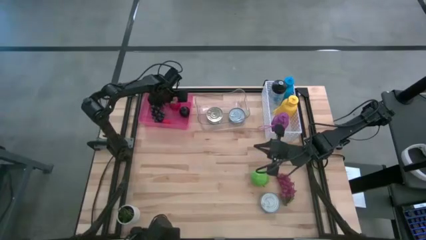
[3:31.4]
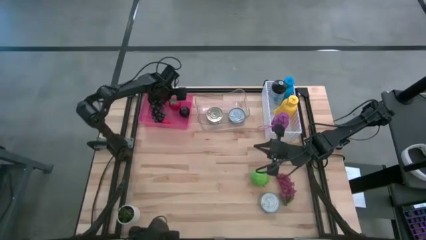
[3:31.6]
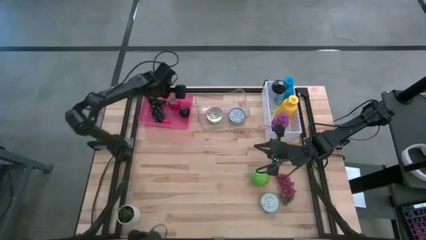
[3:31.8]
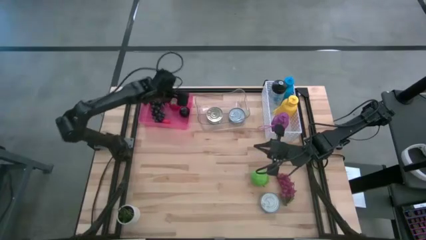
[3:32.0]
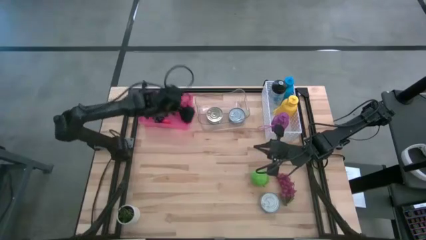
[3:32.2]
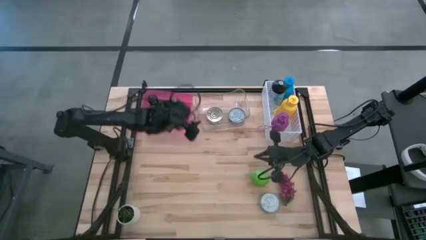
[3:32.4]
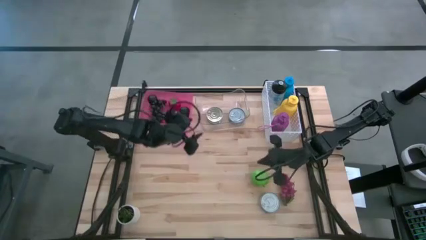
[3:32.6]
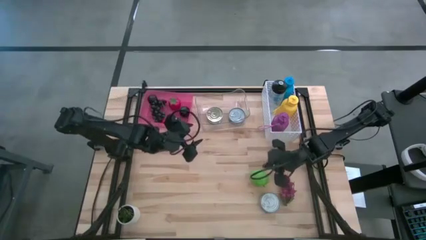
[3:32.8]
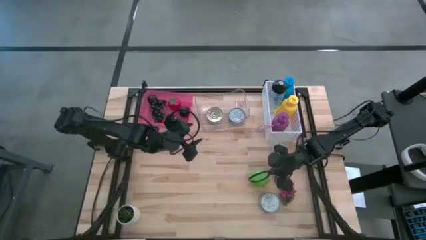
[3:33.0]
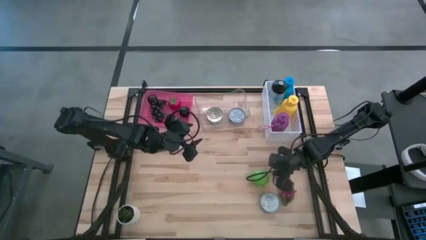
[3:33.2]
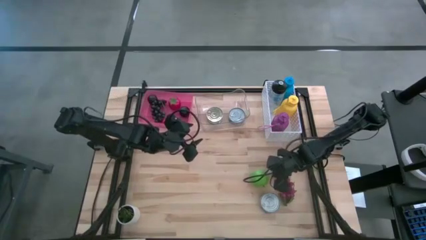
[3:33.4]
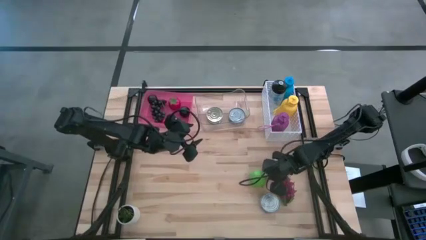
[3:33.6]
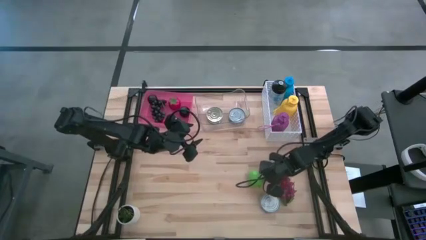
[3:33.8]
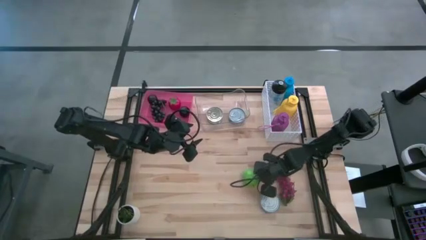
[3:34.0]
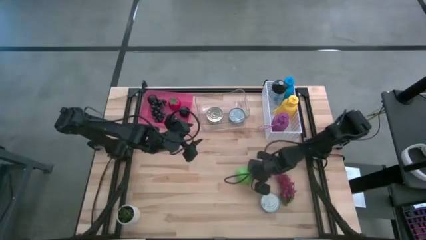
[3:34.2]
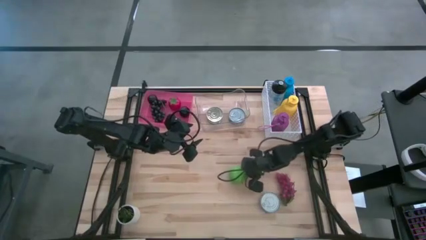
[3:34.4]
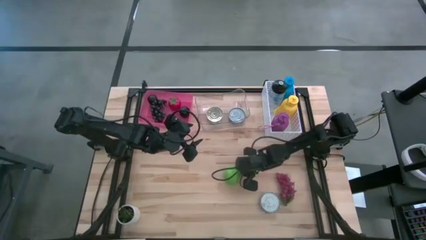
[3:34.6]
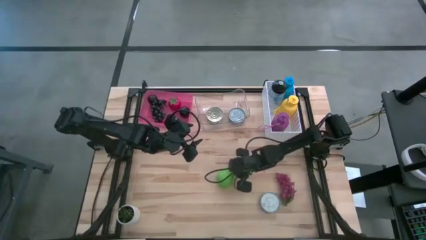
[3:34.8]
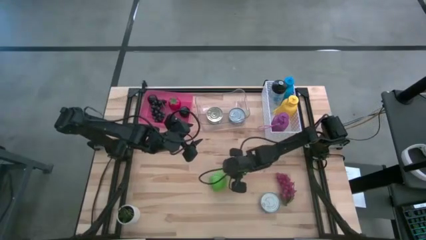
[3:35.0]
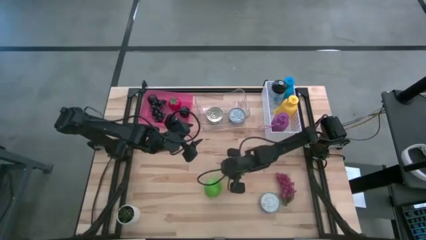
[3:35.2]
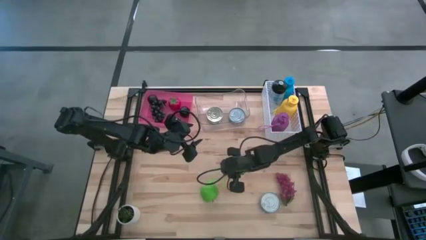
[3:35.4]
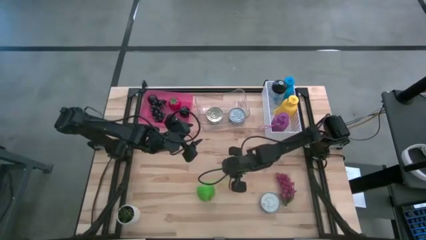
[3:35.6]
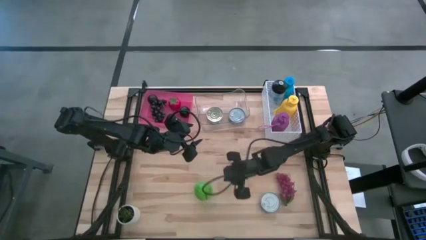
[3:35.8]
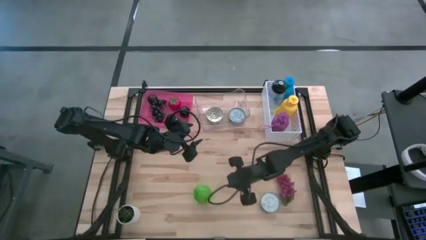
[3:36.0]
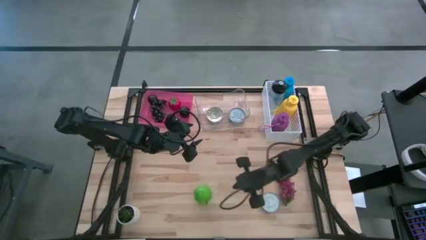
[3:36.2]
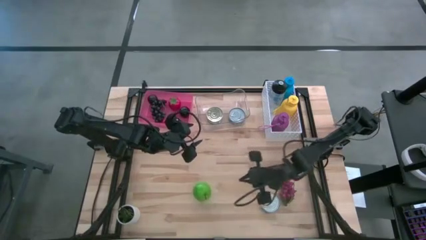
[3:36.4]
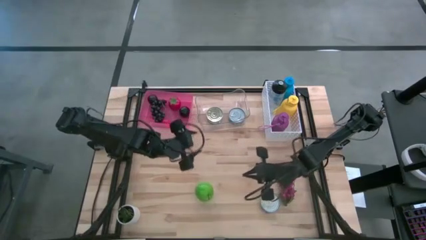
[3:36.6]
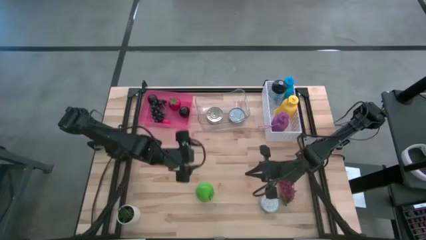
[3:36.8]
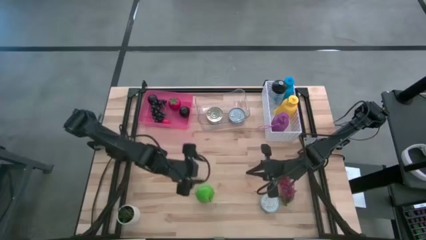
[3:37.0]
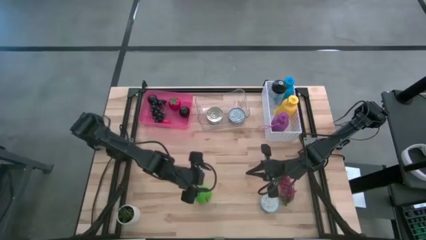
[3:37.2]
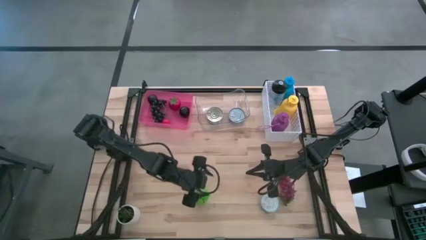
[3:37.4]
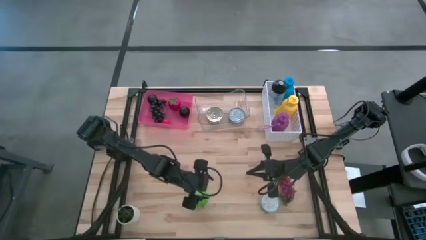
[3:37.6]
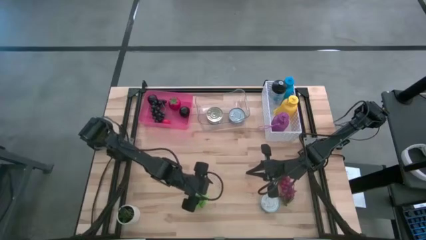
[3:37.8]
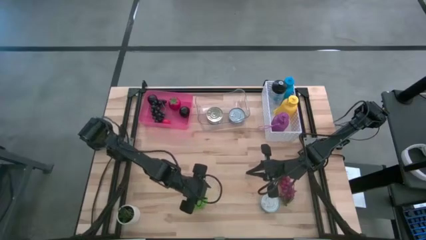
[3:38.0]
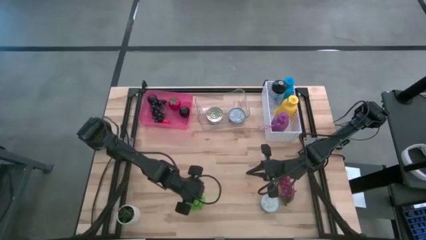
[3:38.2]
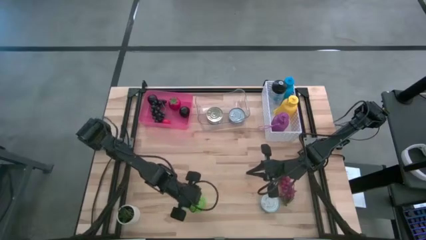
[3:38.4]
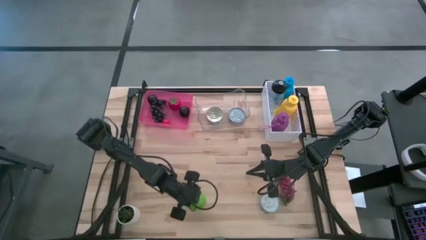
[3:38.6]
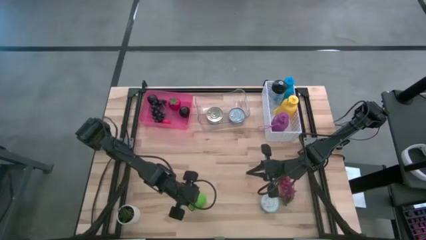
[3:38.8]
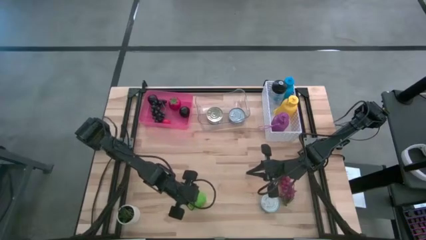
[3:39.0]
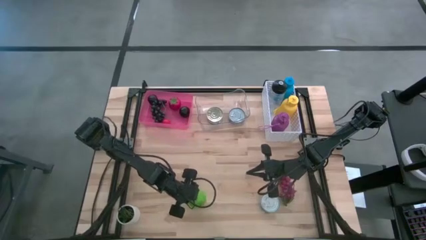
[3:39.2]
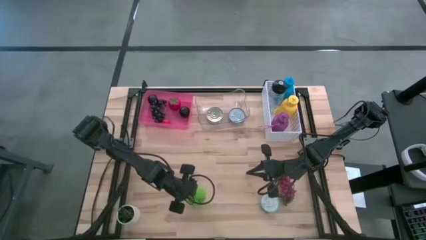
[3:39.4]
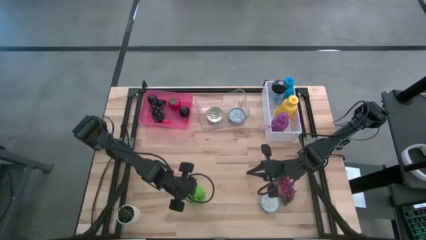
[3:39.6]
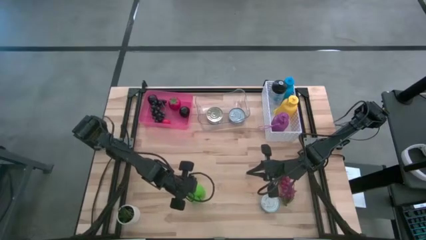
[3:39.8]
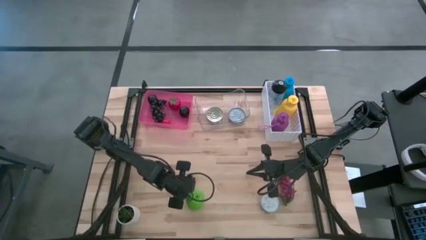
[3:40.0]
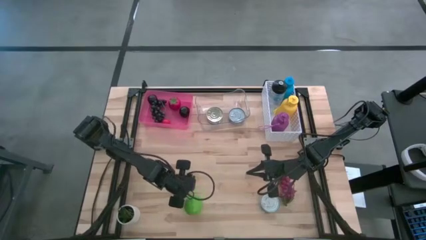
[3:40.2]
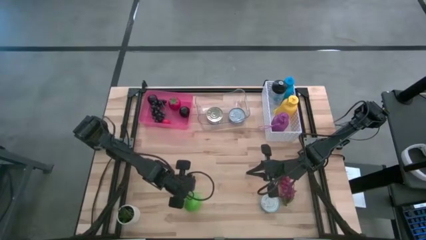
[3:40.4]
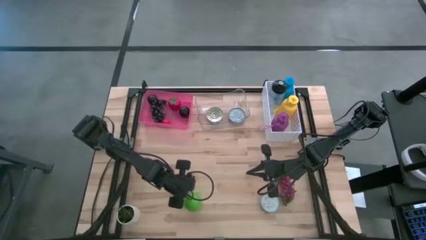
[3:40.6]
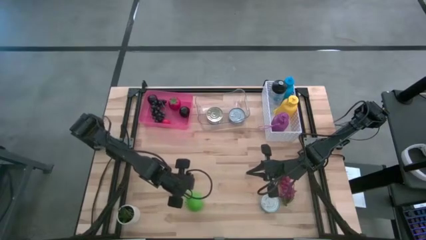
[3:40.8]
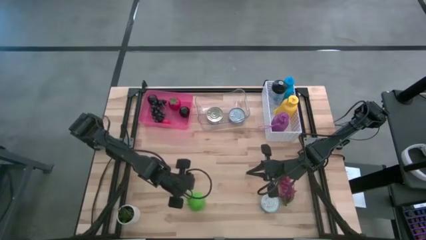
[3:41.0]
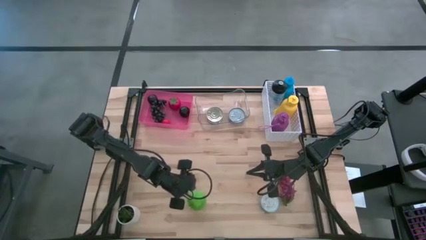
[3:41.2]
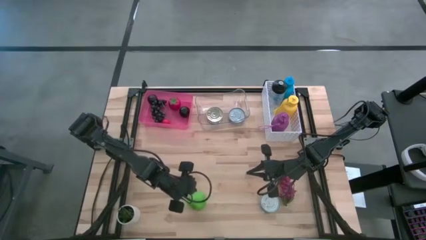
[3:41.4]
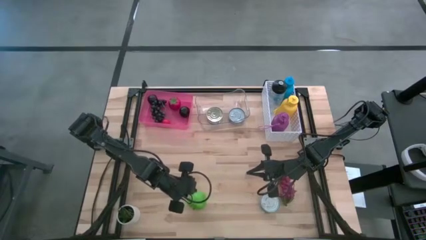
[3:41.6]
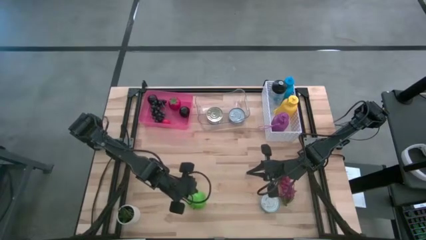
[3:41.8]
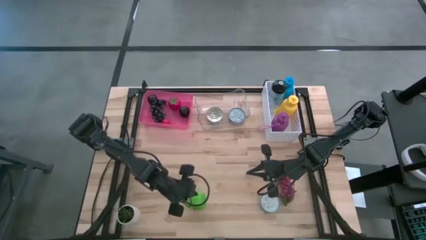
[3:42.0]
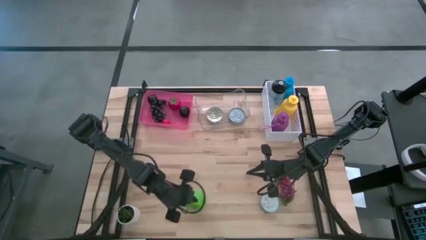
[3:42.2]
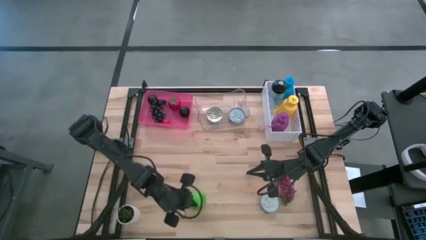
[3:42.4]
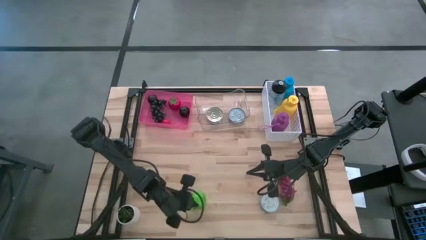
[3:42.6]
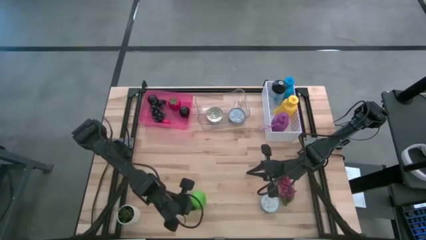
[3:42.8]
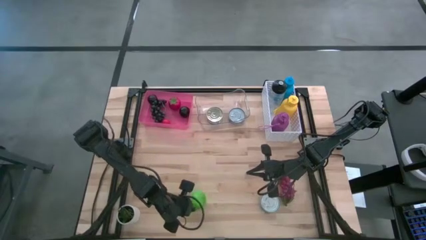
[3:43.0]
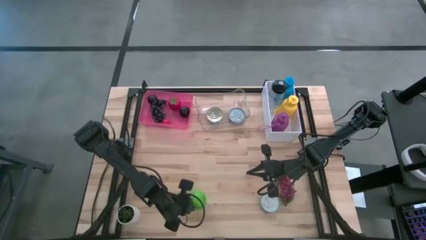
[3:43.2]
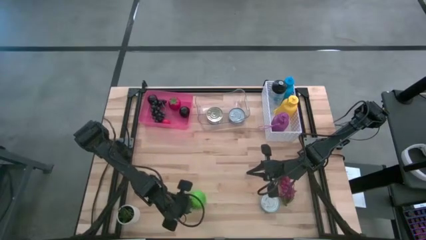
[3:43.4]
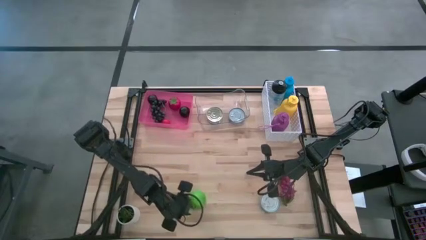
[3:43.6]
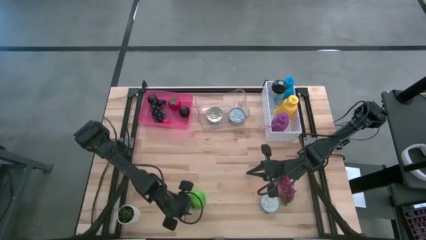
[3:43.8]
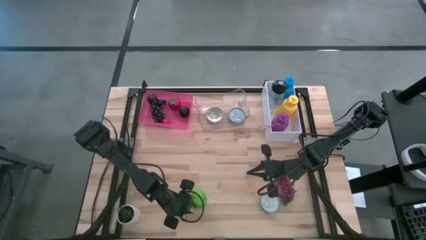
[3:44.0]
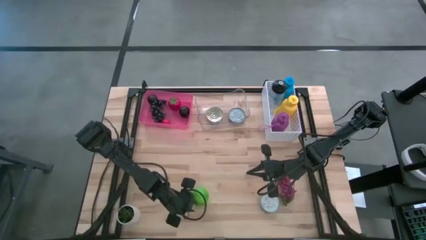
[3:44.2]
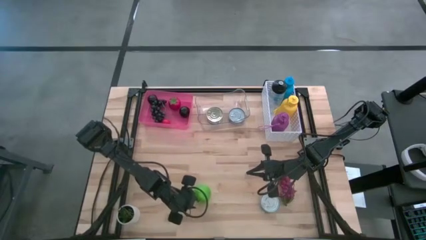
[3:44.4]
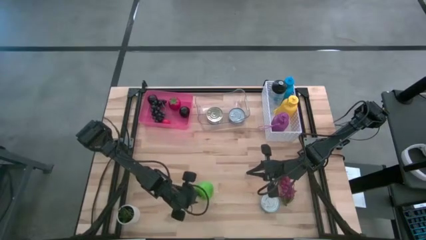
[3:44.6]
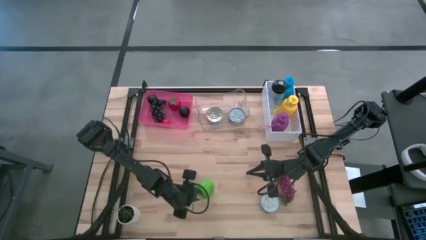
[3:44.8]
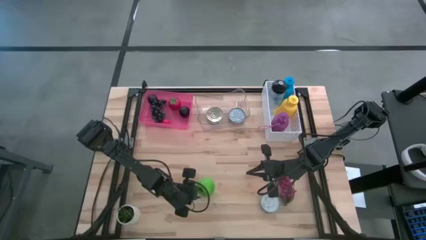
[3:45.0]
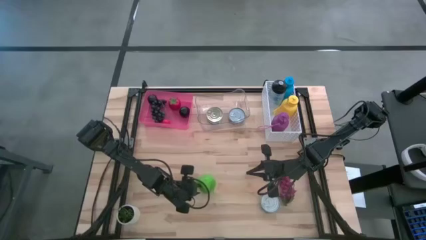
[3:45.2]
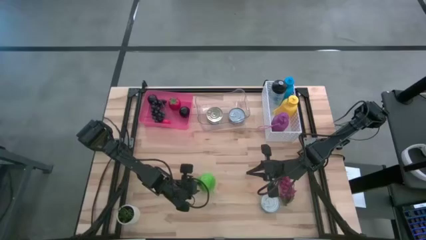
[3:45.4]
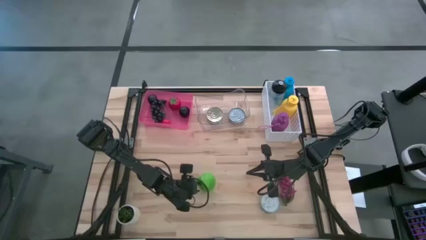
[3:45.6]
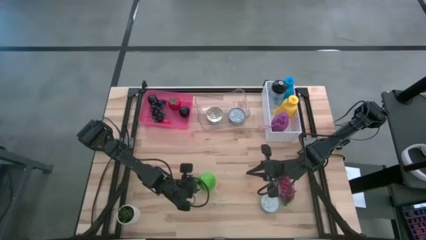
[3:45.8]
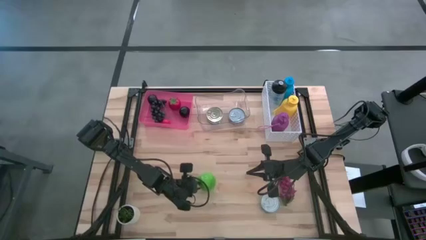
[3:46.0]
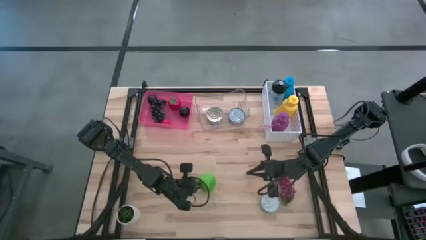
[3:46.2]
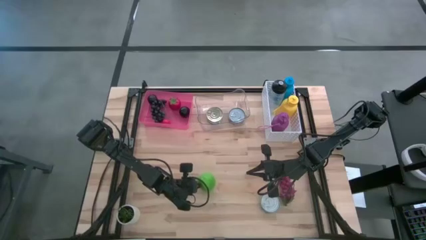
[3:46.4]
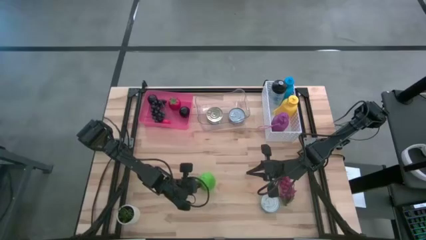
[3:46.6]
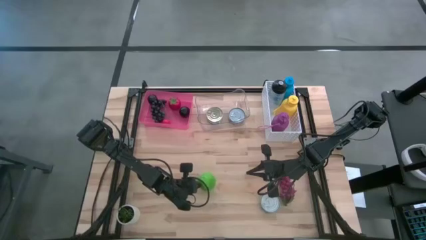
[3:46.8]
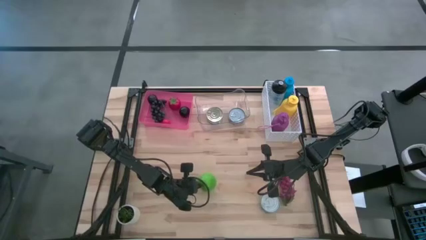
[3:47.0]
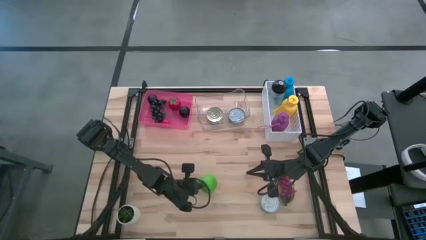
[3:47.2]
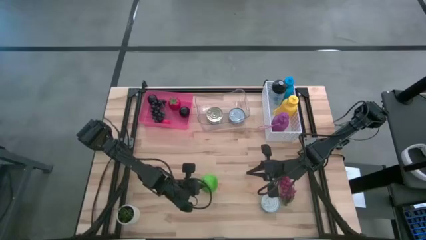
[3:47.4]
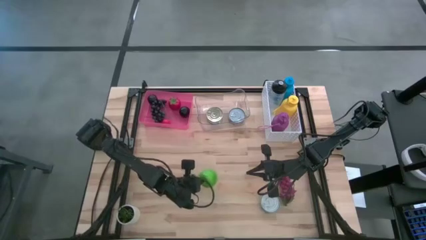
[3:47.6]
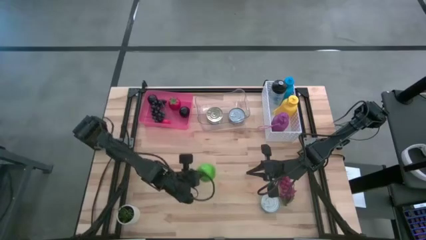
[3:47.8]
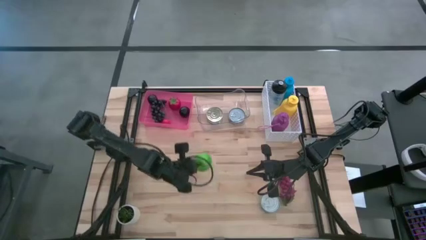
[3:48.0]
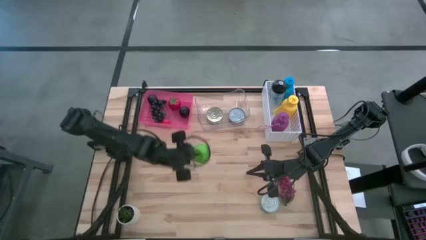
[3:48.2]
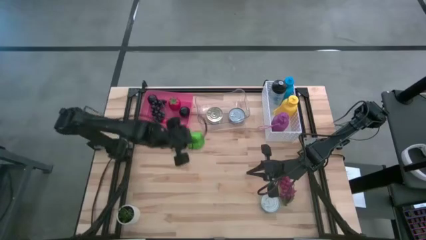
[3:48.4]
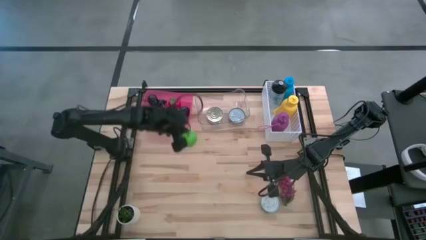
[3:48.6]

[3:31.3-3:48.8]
Task: Pick & Place Food Item
Put the green apple into the pink bin
